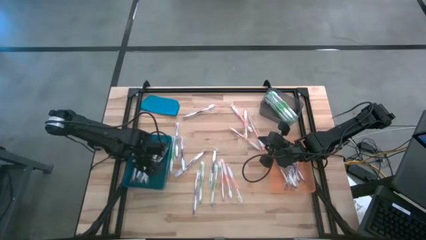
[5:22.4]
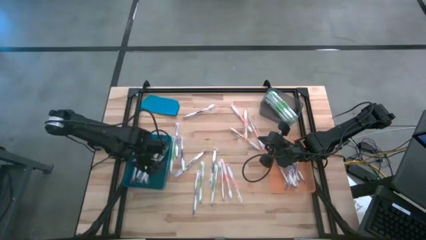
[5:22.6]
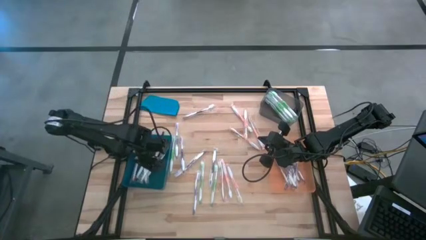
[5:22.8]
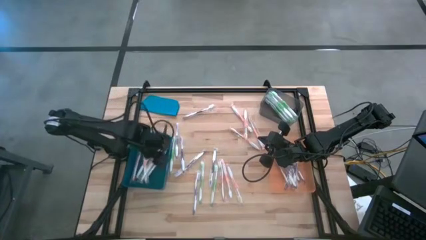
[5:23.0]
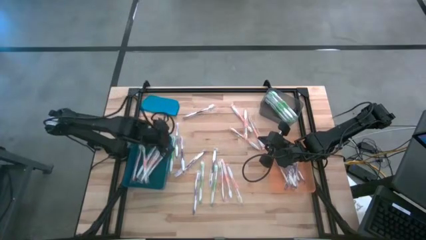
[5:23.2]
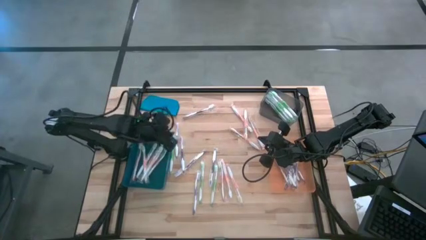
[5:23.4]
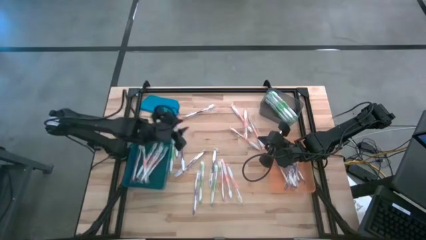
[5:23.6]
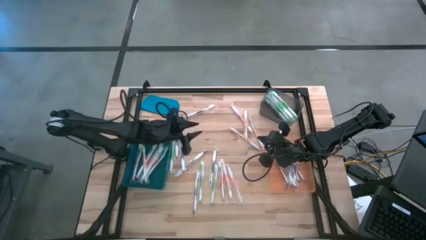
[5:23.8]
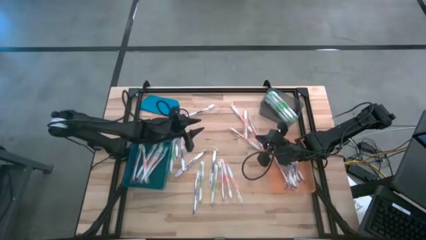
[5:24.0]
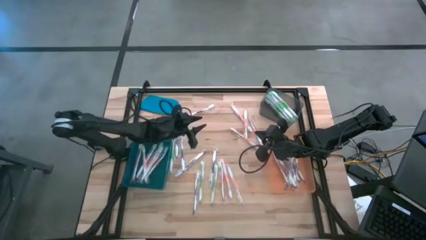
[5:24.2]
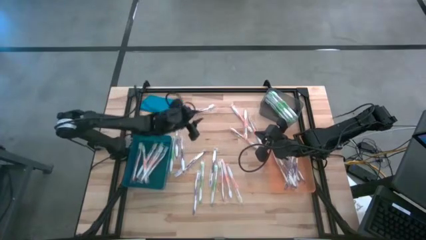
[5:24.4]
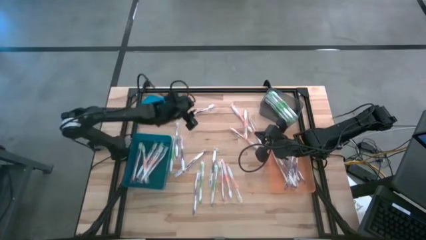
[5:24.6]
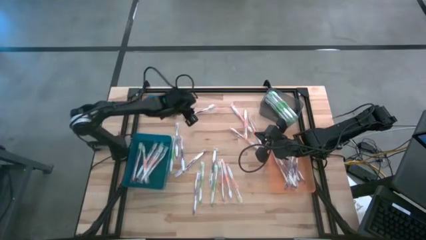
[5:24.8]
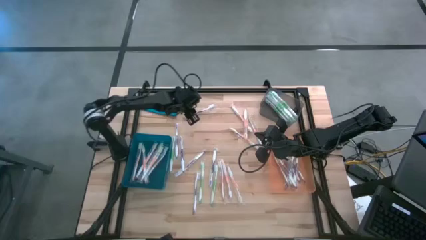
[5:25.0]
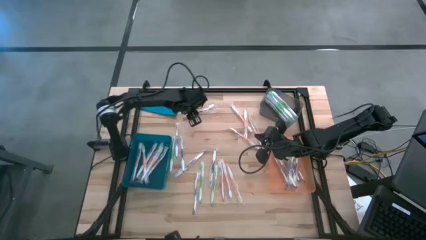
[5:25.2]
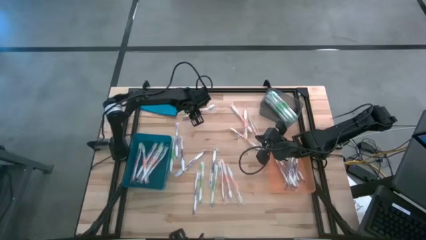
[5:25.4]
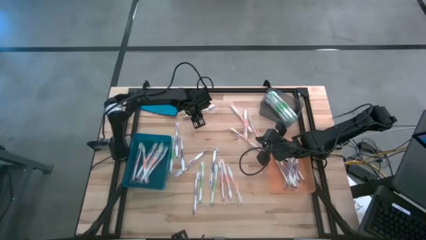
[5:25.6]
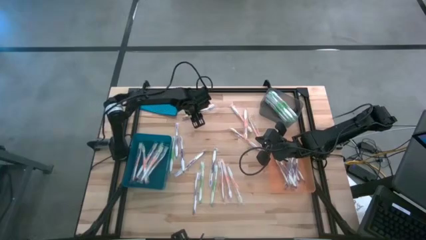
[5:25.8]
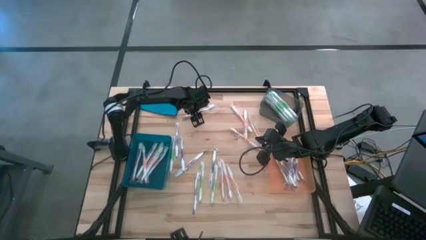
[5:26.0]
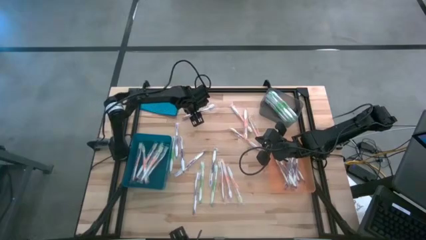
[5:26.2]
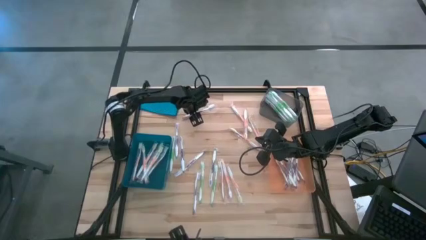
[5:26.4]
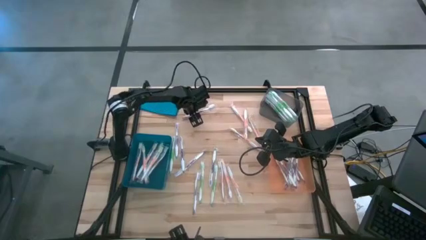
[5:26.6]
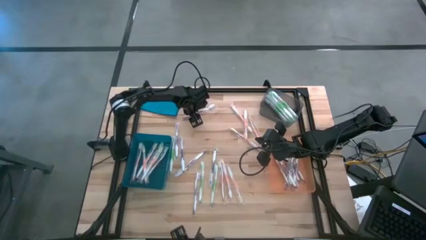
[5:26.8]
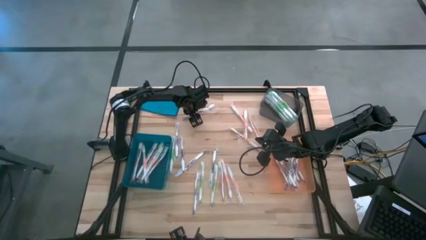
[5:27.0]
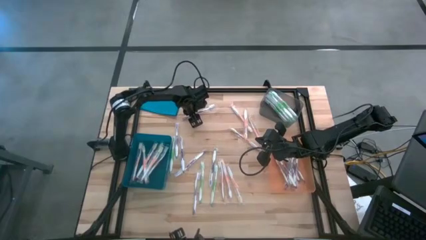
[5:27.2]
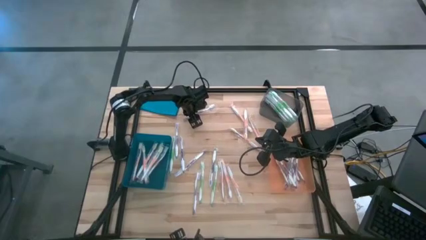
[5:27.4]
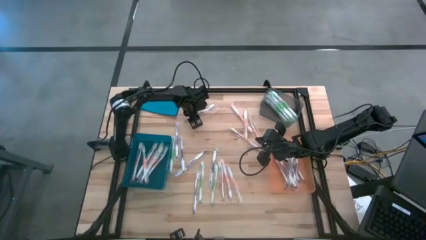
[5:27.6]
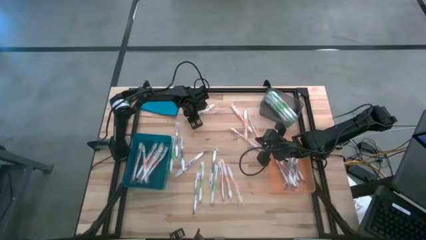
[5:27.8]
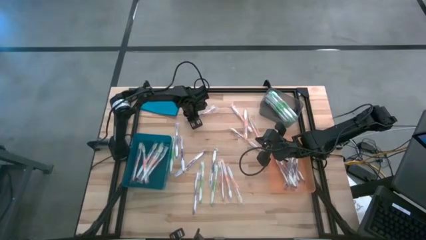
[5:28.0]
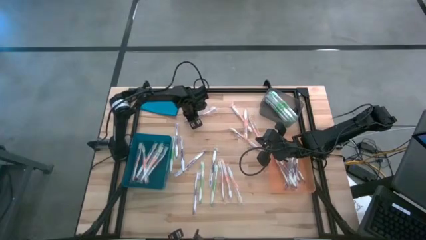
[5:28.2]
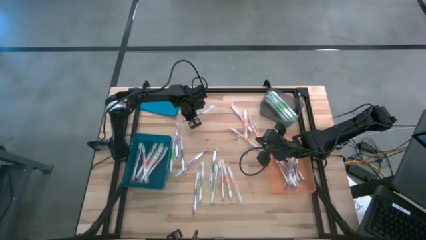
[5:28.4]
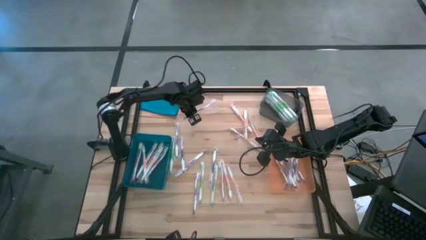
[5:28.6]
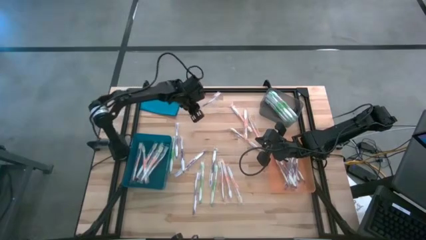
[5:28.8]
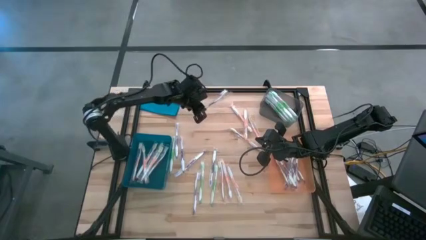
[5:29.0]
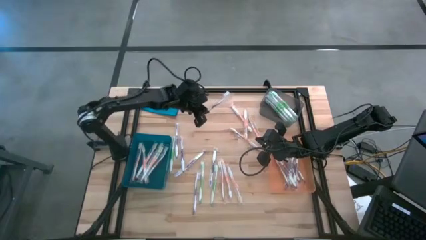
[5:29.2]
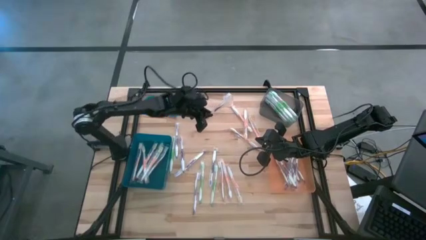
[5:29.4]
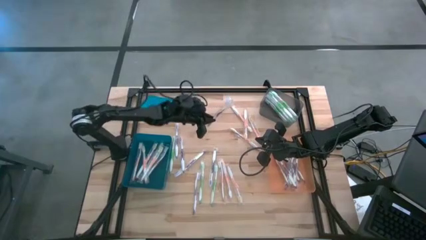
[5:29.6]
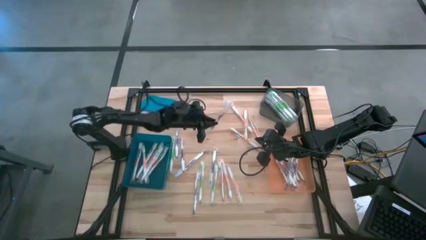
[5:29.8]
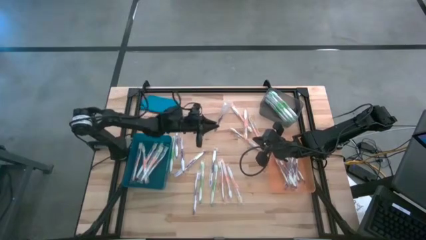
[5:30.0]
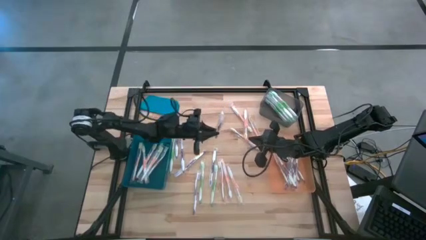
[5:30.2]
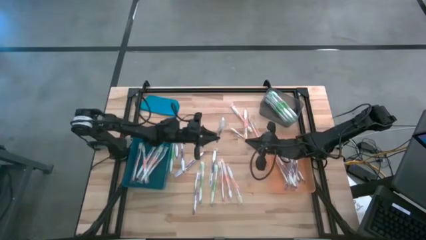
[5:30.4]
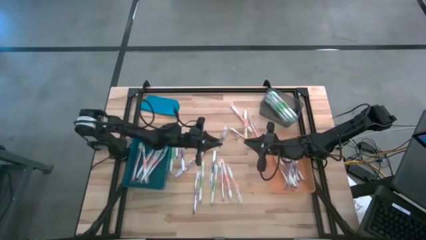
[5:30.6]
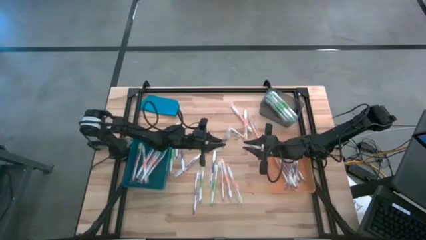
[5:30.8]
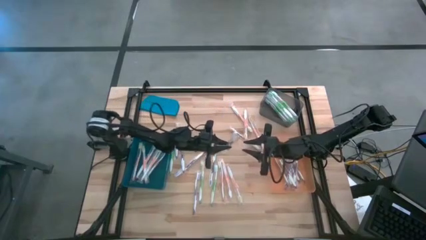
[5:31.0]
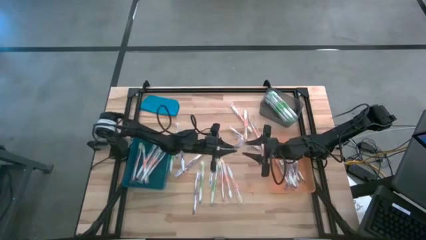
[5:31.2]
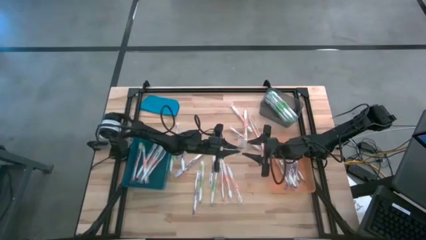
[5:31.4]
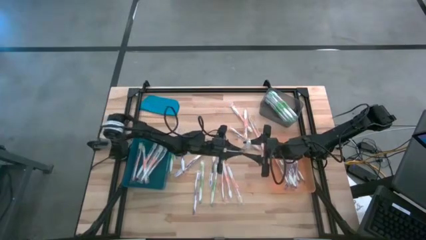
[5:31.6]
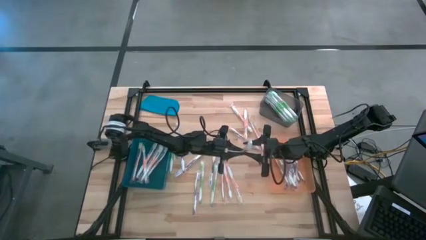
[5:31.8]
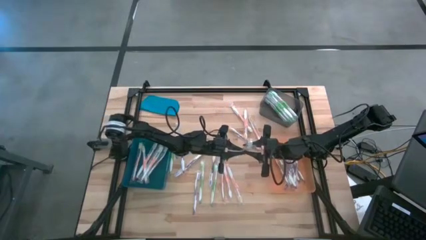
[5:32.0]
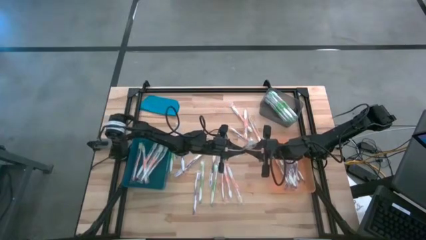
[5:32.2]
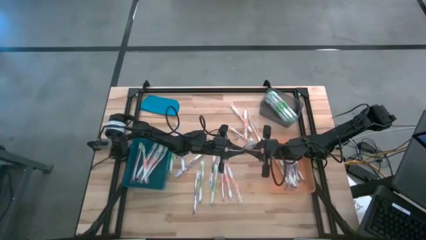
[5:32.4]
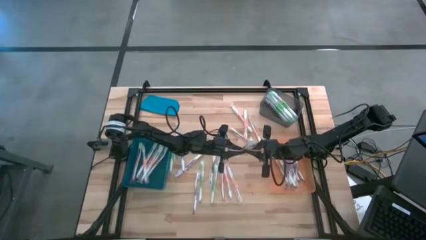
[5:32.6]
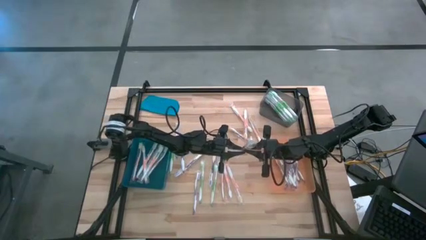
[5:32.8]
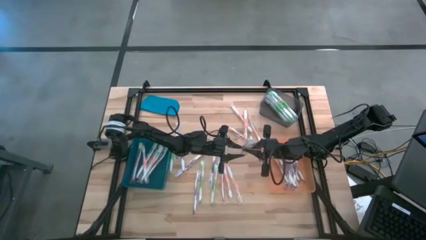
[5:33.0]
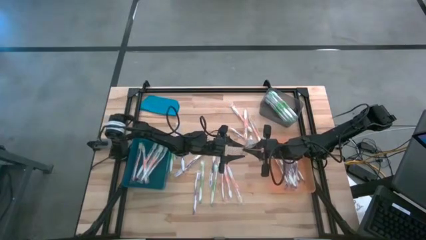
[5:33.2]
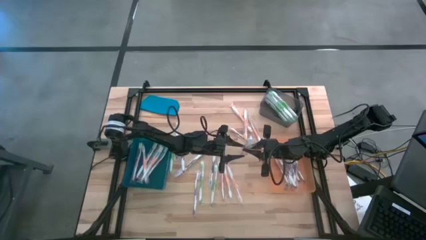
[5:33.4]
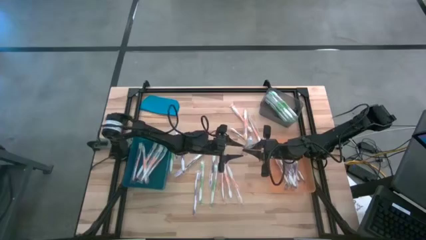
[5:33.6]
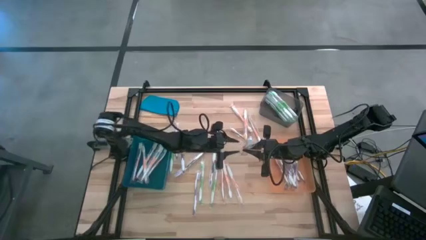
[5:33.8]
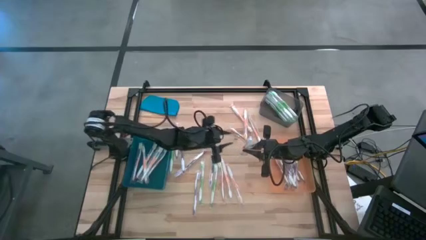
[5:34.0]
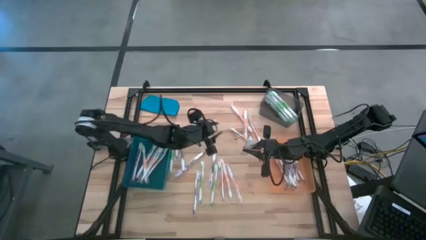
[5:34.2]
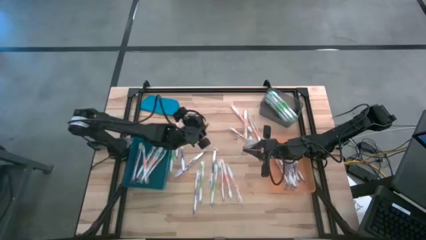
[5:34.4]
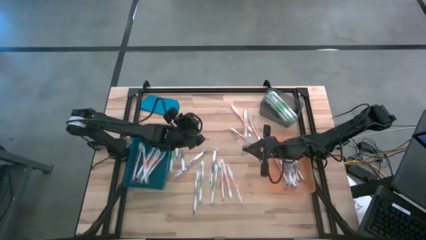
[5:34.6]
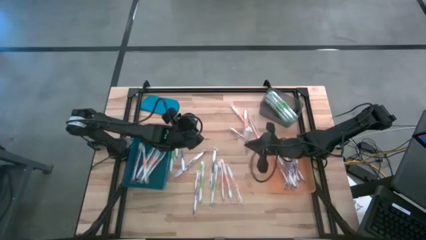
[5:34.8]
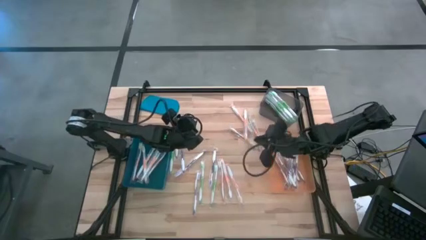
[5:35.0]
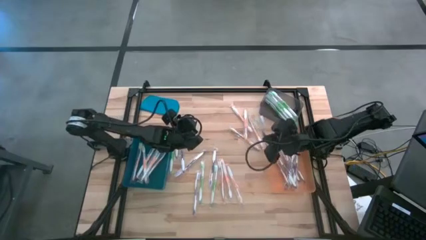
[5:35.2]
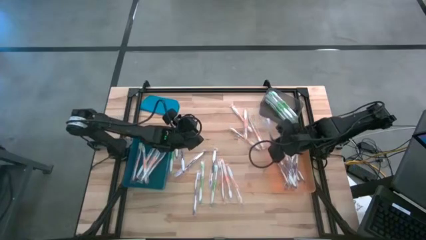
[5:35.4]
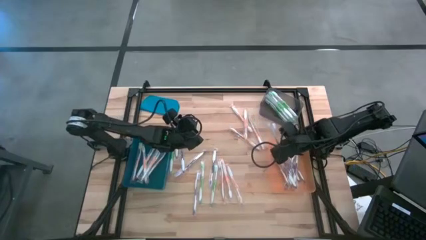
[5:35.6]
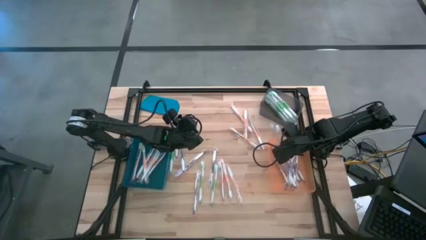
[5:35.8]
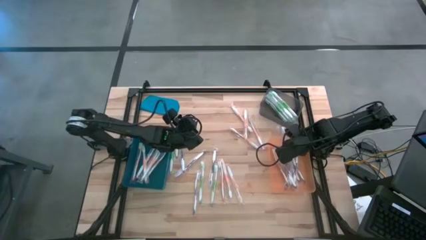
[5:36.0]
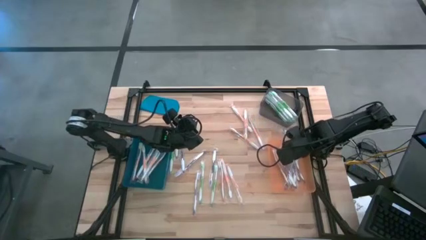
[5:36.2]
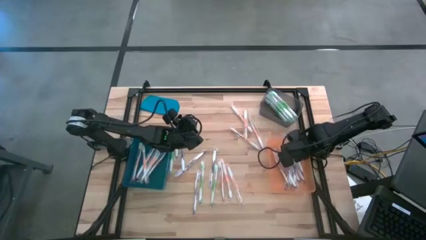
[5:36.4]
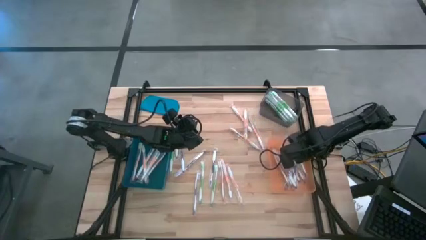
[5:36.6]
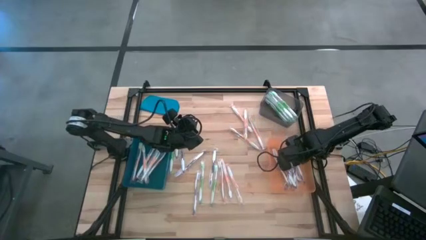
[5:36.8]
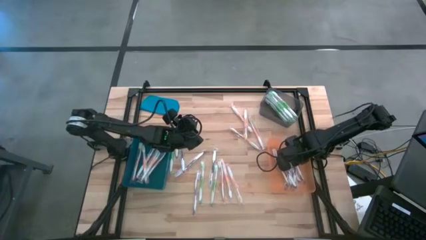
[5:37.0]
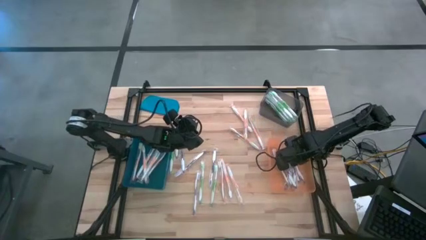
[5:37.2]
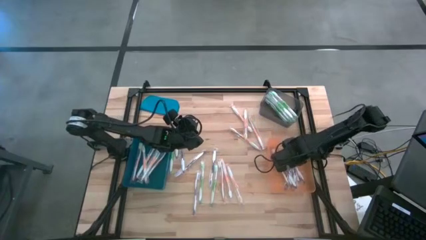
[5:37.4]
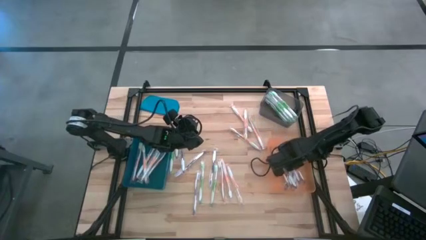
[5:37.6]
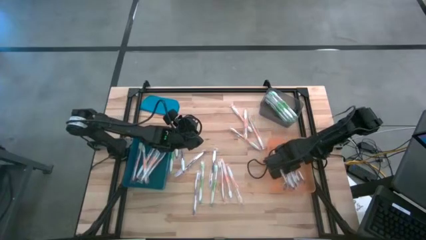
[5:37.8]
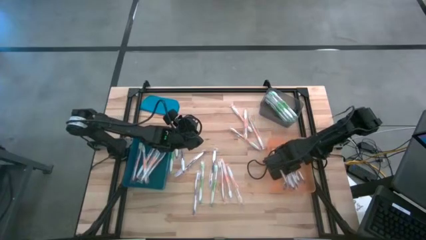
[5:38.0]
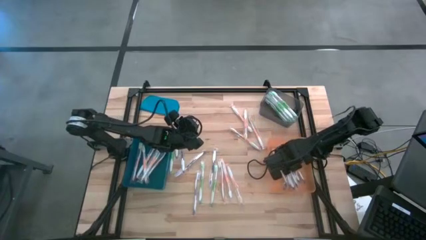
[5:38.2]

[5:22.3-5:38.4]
Task: Pick & Place Toothbrushes
Put the purple toothbrush into the orange bin
